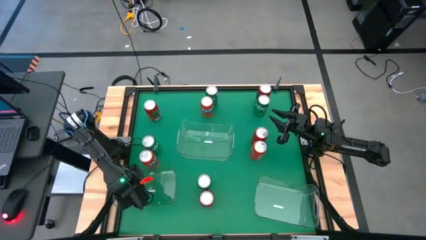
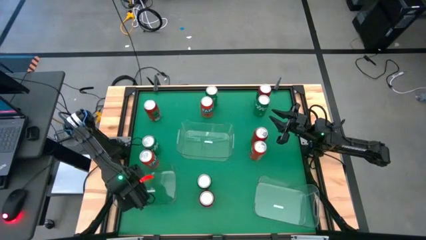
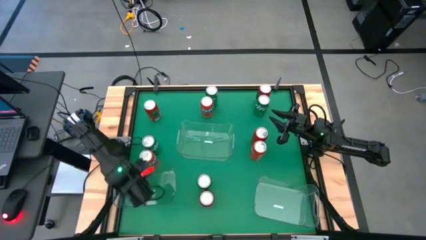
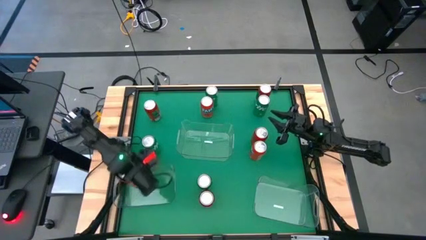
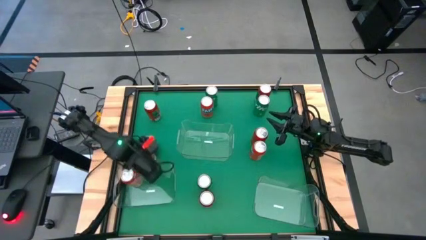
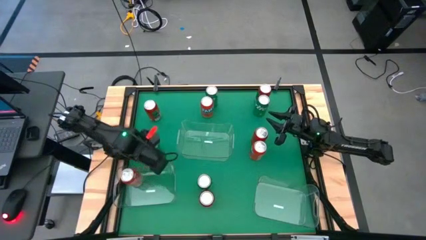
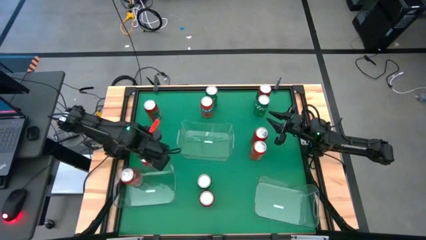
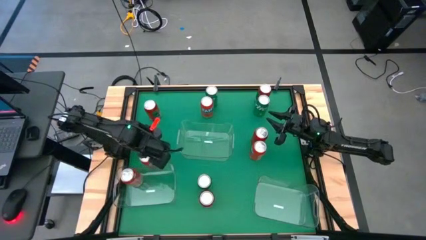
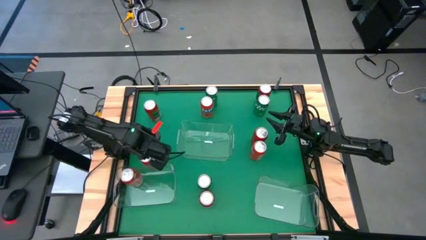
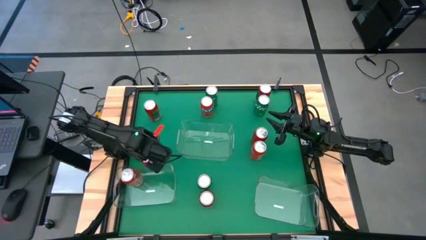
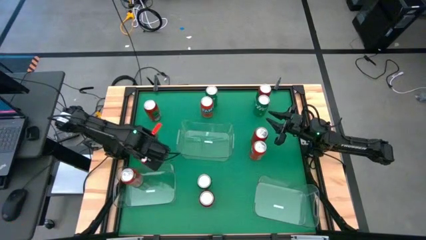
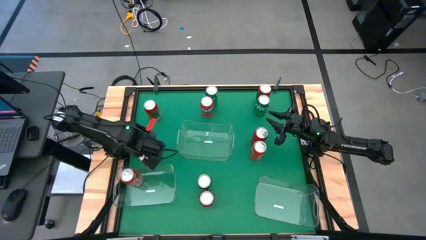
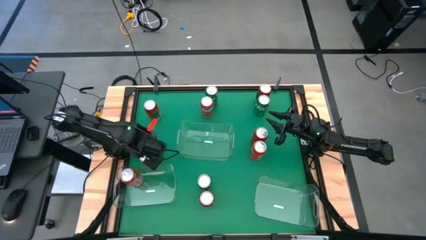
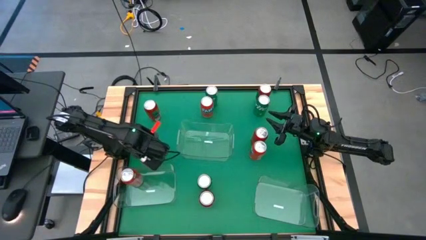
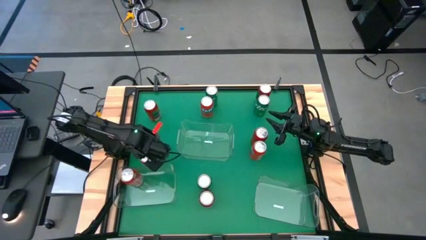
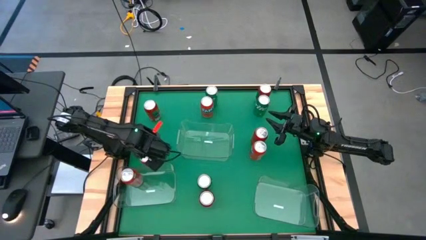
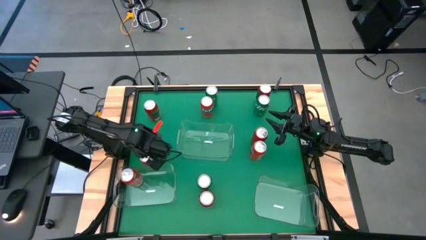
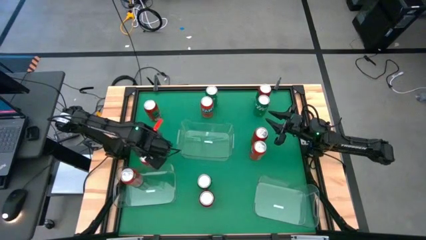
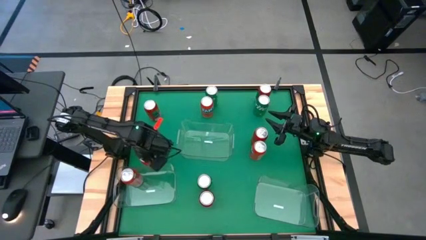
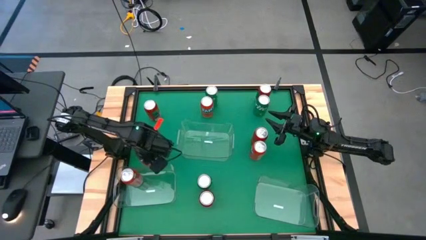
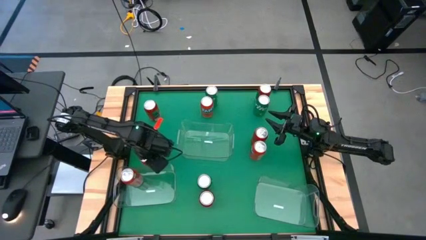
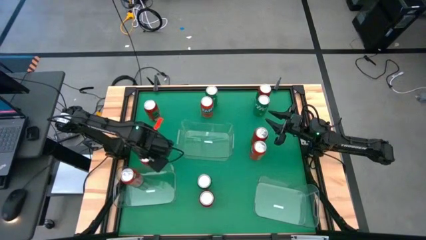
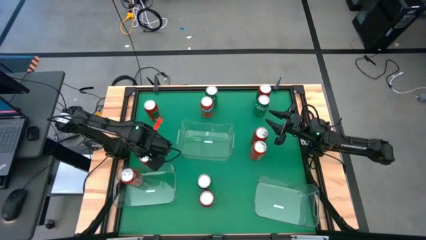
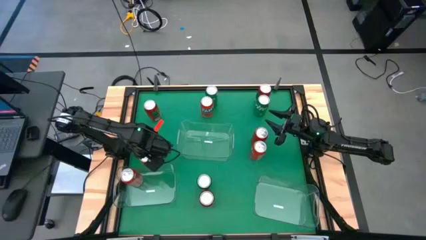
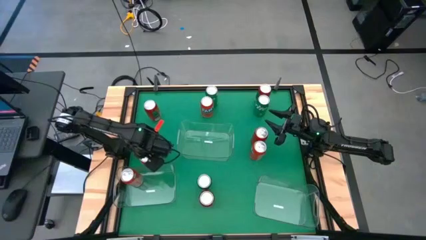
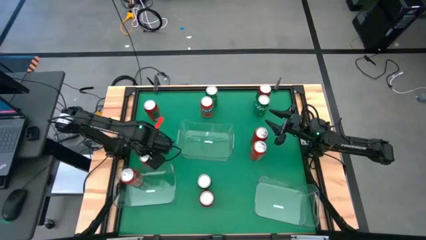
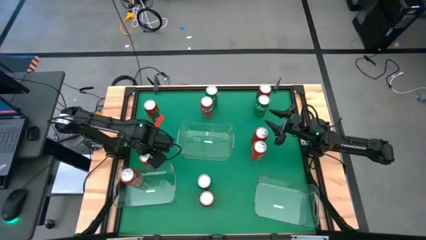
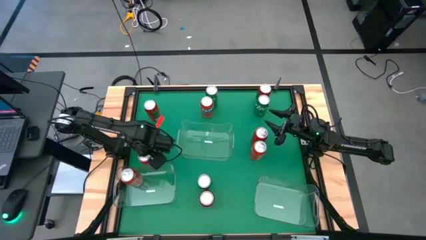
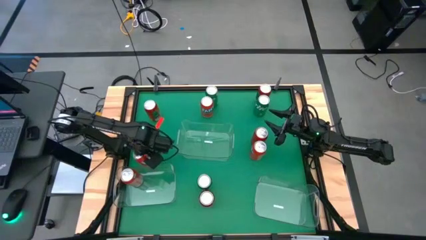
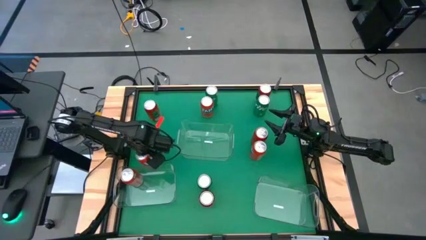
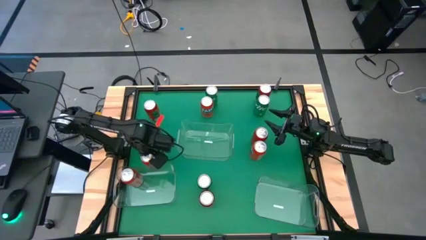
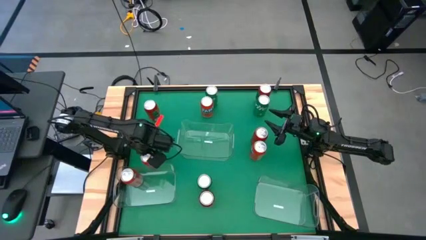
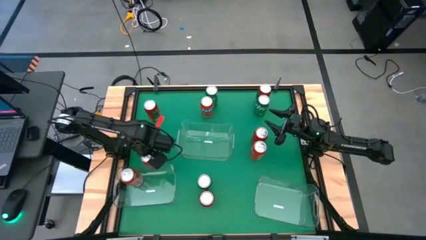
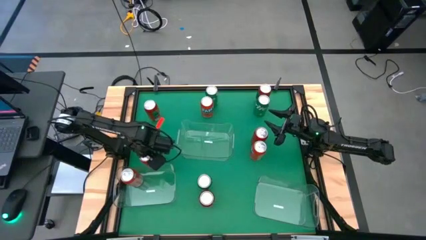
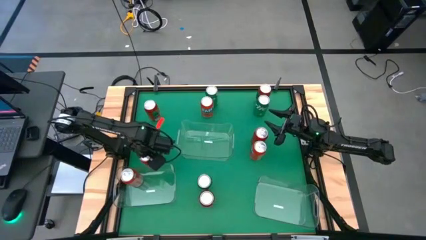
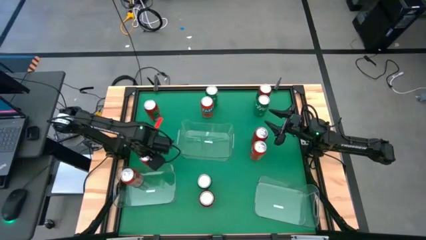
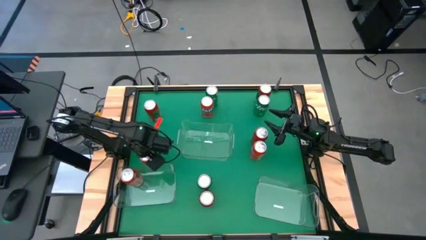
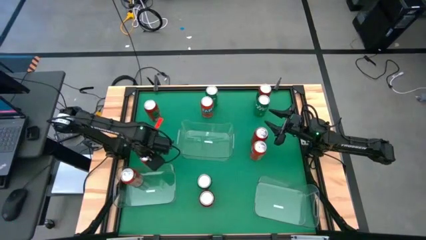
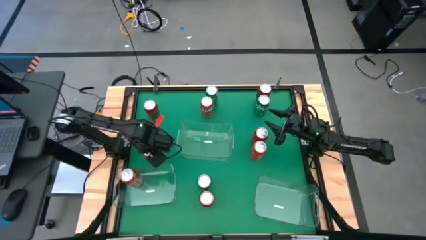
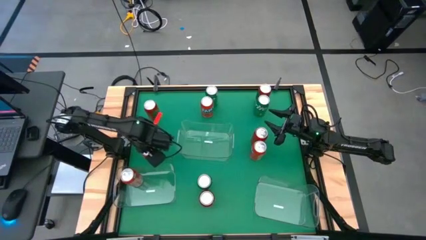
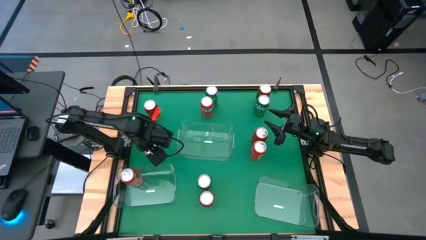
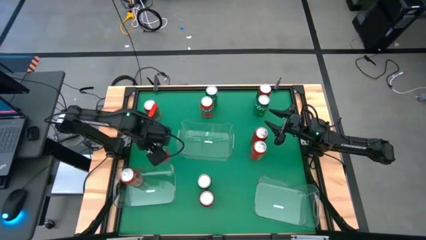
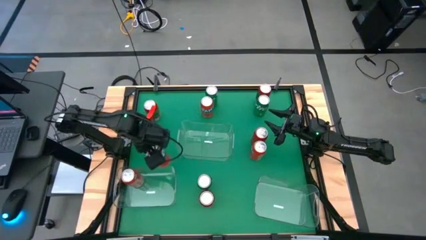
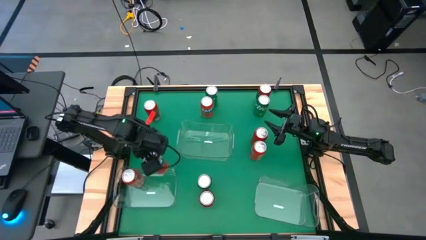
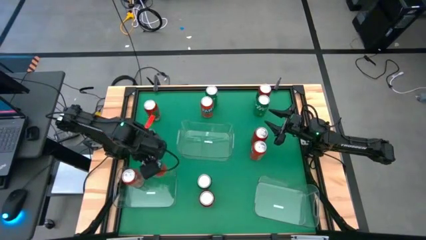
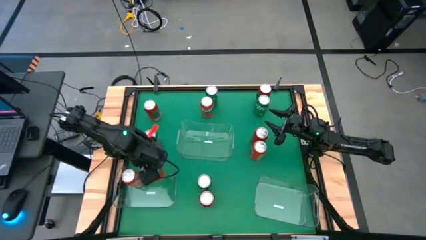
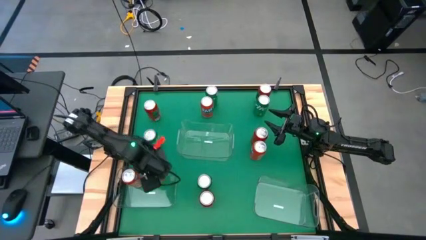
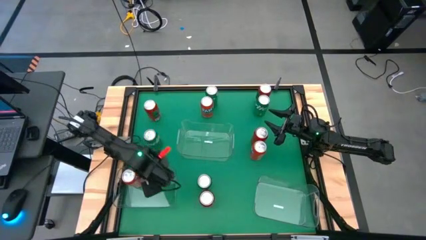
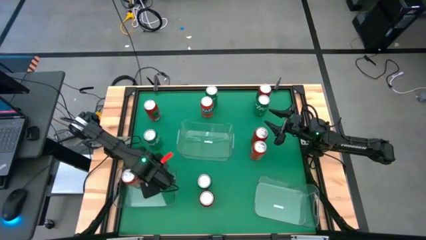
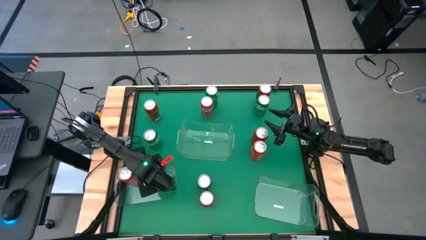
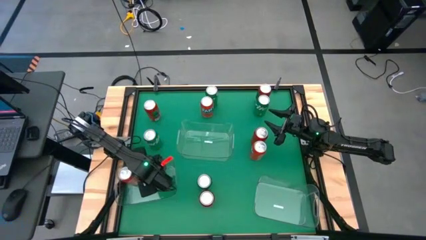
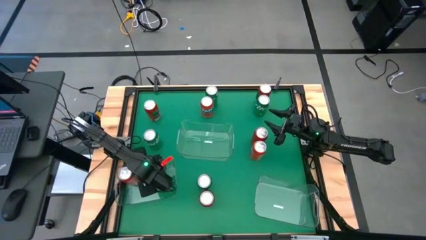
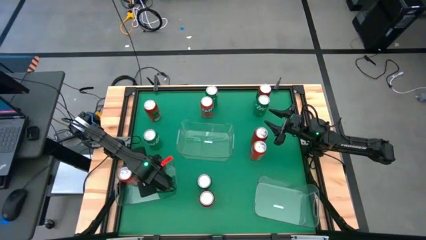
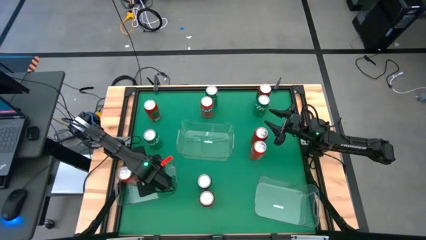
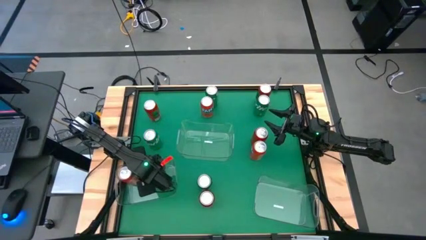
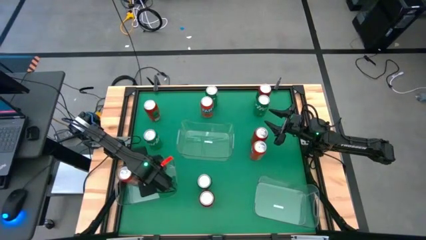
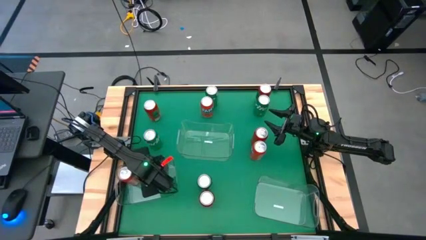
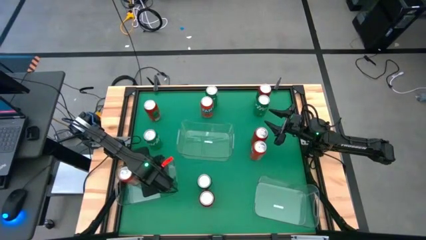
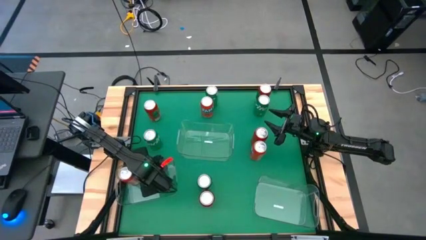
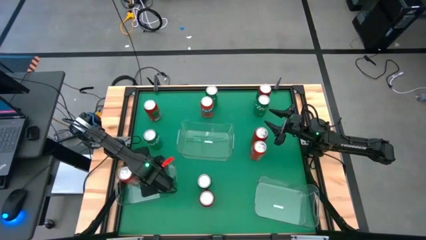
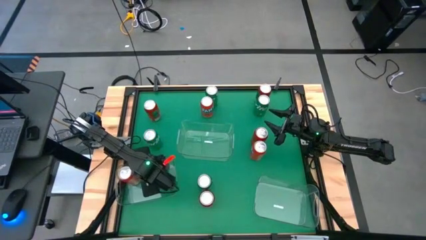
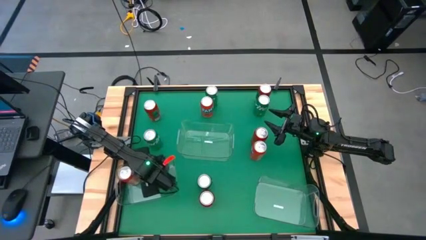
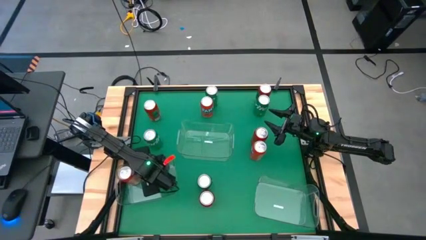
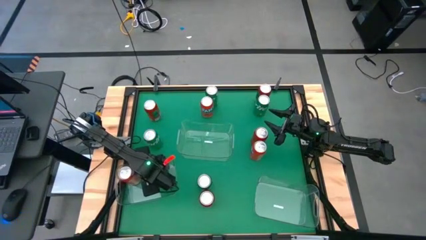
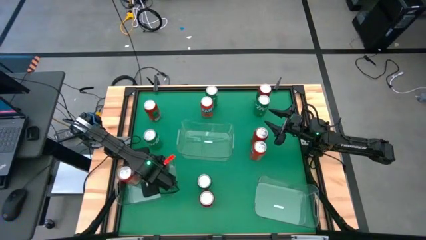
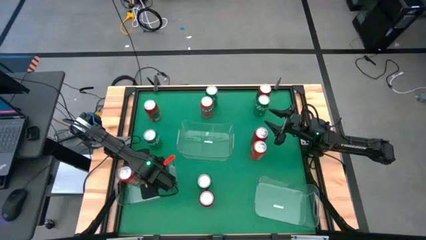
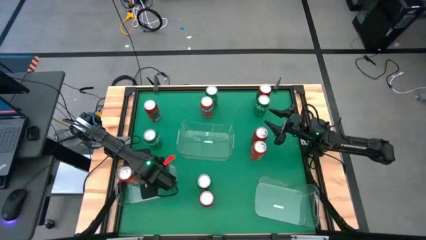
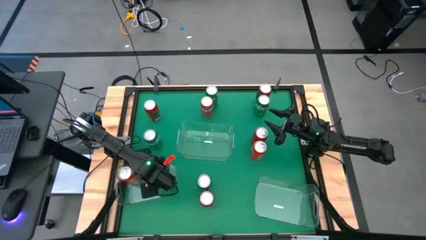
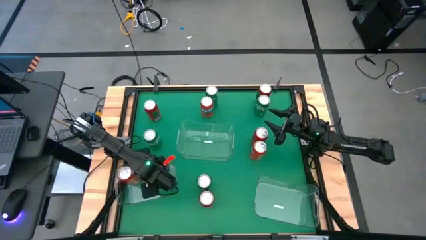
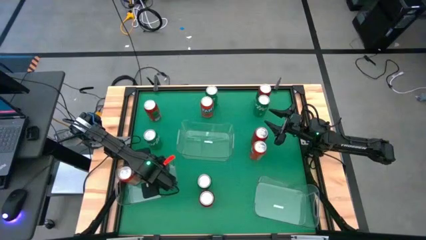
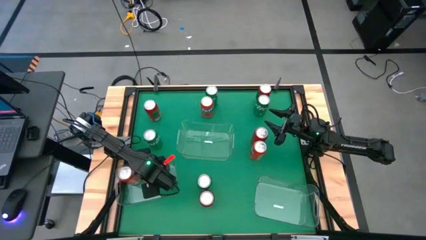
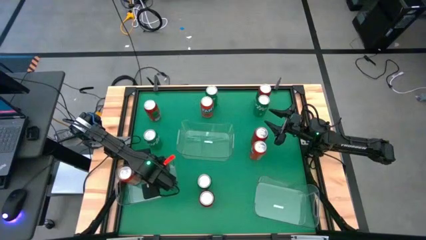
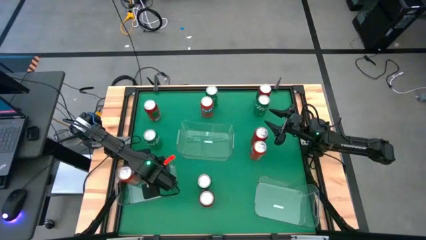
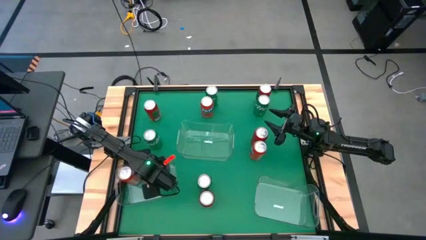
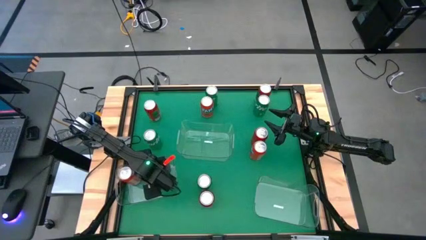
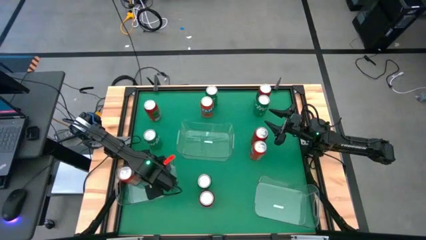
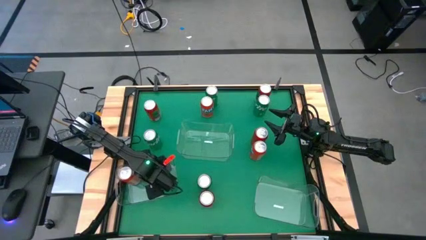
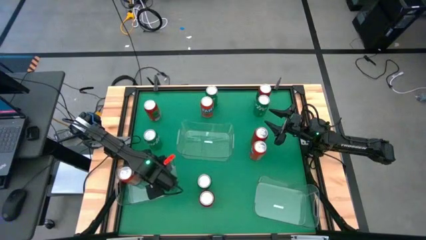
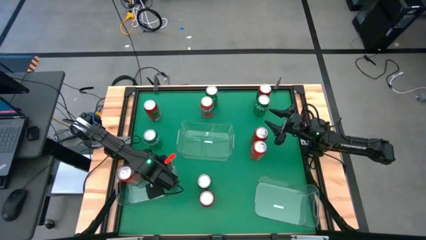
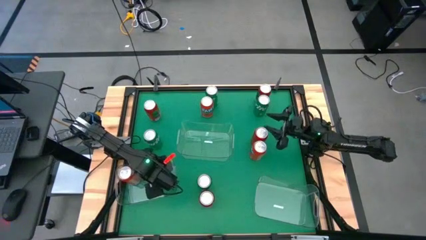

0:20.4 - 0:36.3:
Task: Sort soda cans
Put the bottom left red soda can into the bottom left transparent bin
